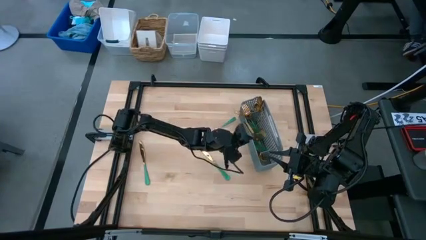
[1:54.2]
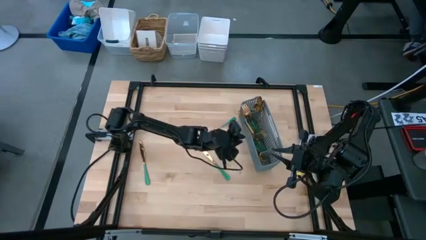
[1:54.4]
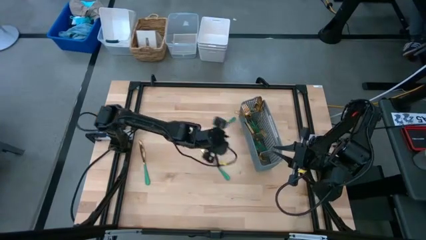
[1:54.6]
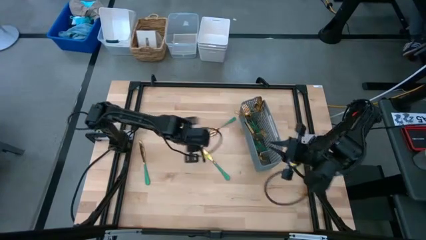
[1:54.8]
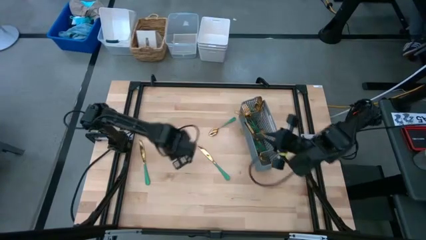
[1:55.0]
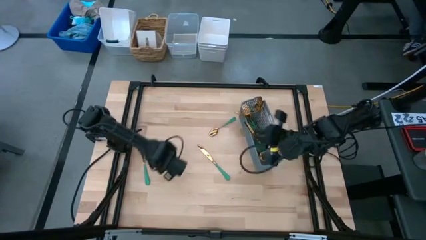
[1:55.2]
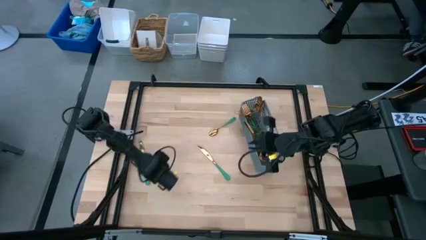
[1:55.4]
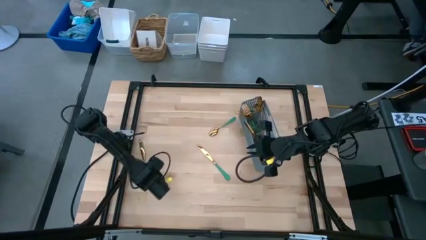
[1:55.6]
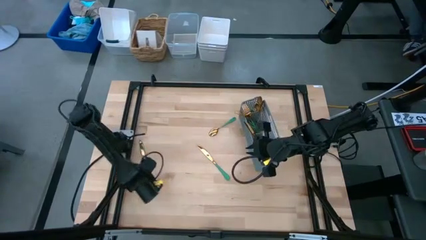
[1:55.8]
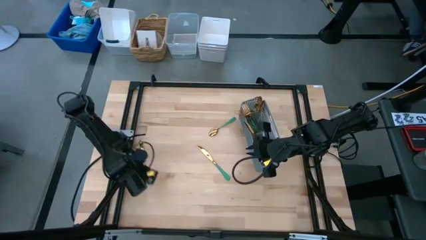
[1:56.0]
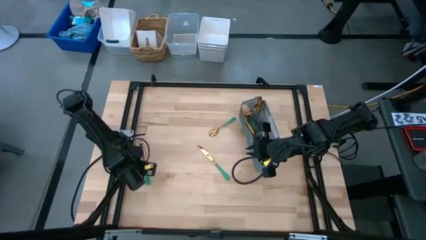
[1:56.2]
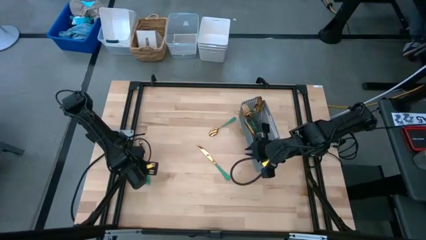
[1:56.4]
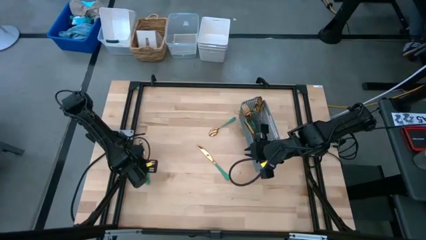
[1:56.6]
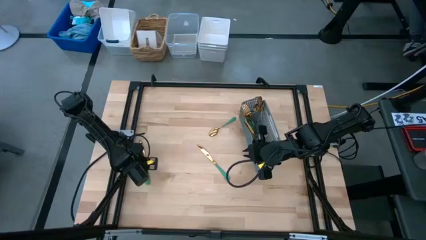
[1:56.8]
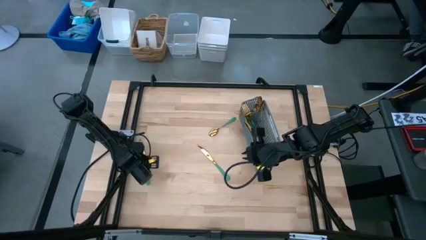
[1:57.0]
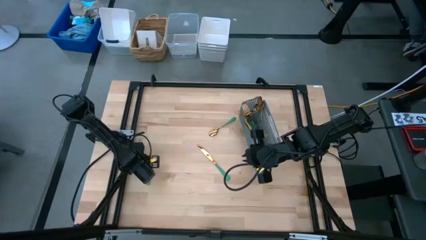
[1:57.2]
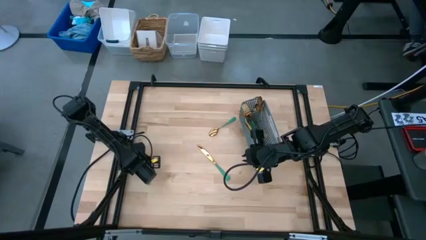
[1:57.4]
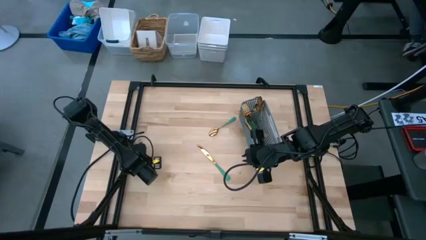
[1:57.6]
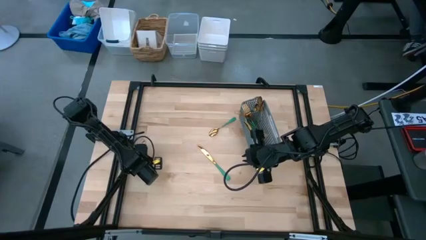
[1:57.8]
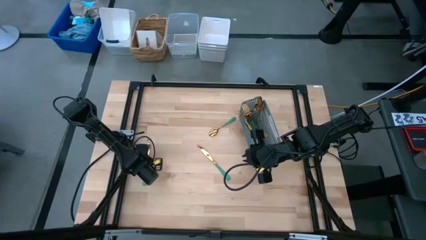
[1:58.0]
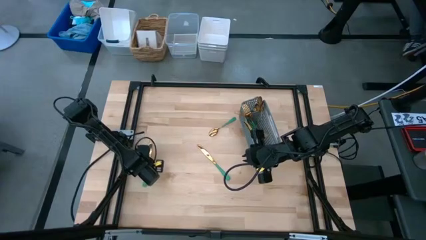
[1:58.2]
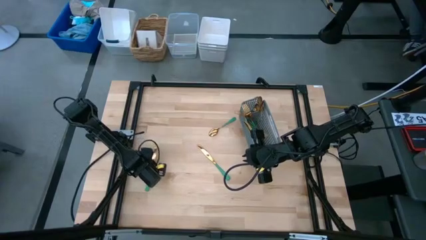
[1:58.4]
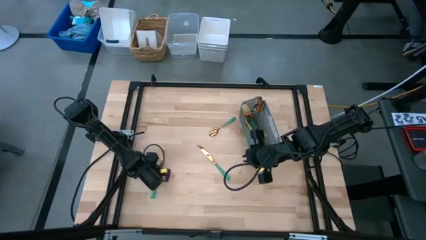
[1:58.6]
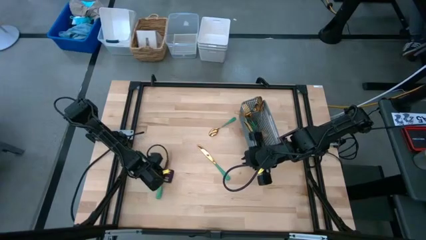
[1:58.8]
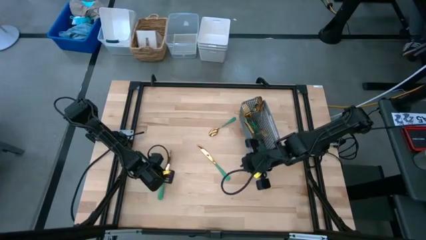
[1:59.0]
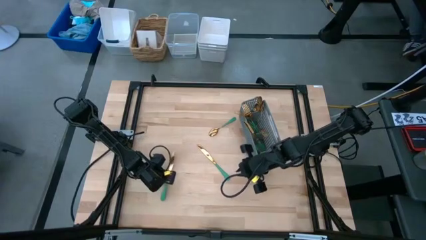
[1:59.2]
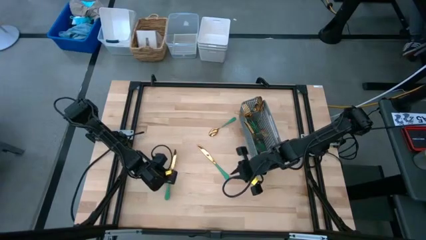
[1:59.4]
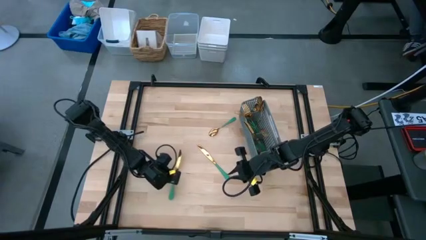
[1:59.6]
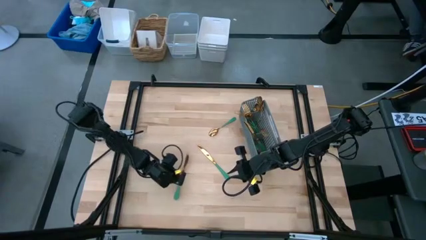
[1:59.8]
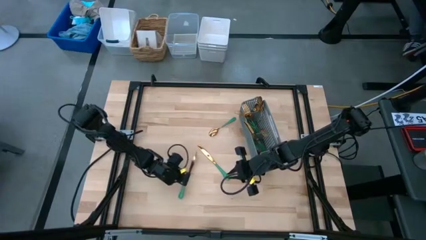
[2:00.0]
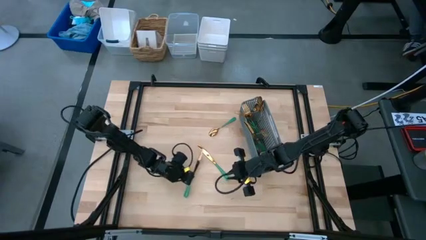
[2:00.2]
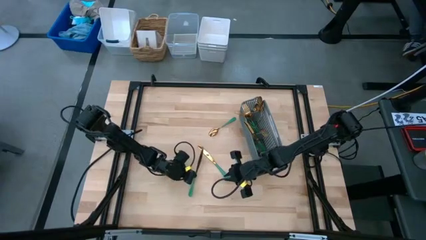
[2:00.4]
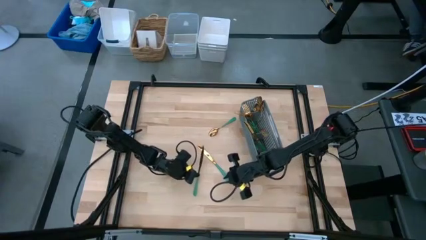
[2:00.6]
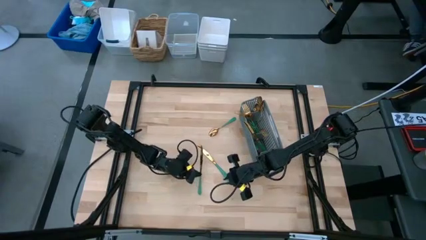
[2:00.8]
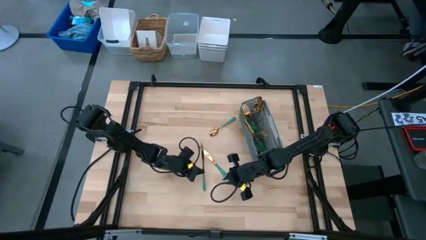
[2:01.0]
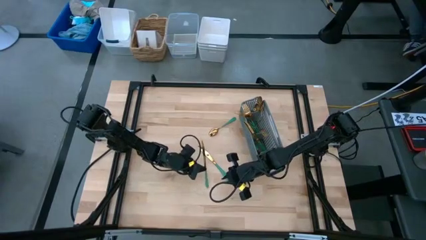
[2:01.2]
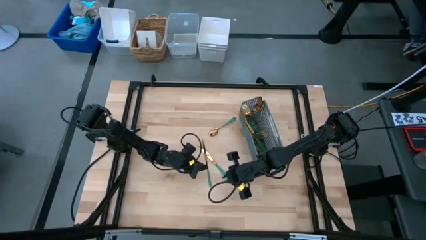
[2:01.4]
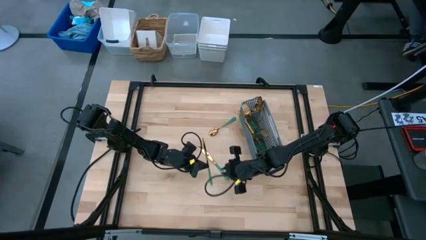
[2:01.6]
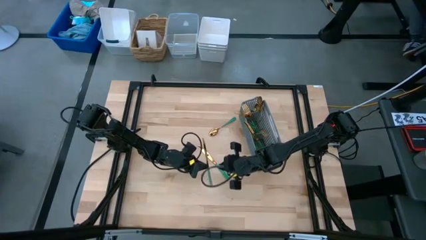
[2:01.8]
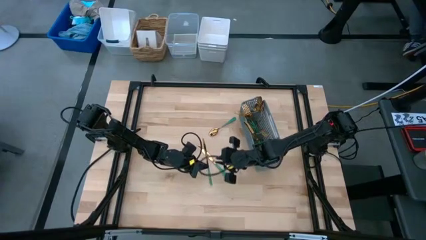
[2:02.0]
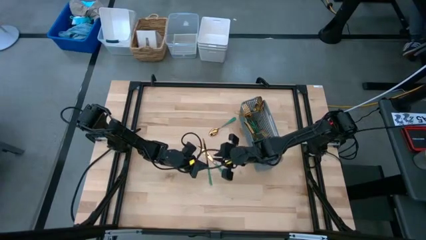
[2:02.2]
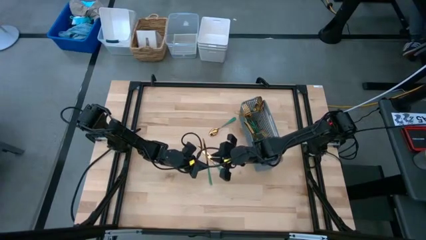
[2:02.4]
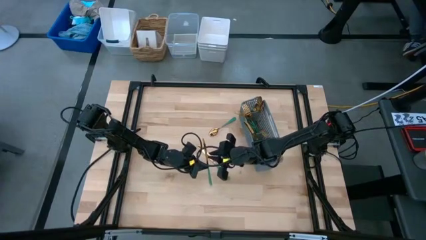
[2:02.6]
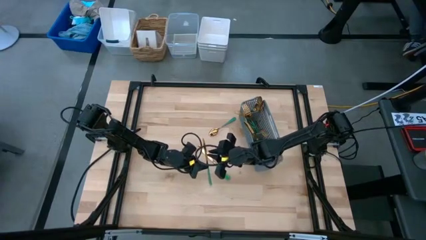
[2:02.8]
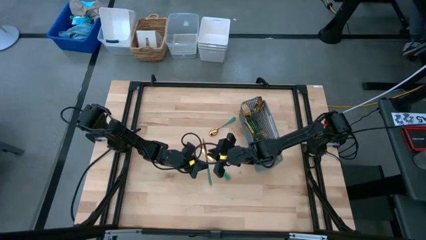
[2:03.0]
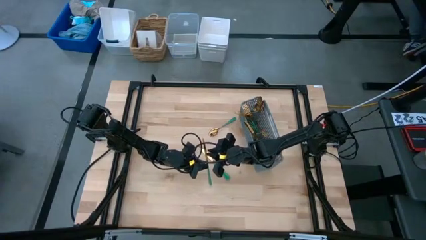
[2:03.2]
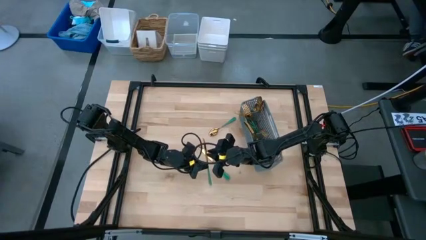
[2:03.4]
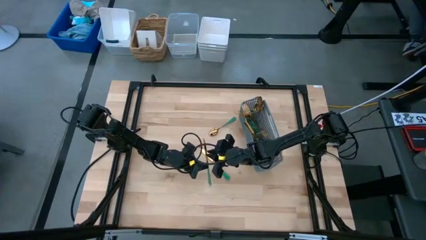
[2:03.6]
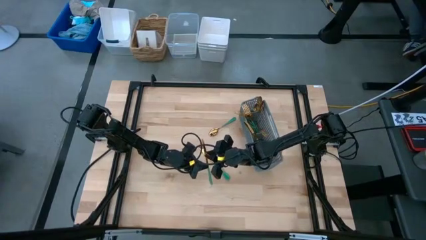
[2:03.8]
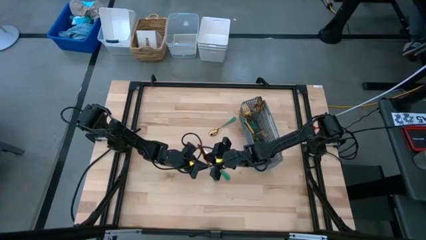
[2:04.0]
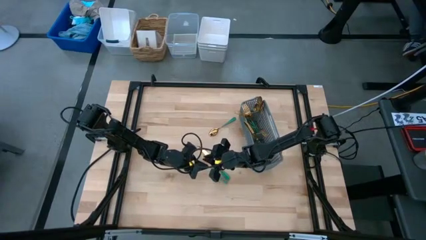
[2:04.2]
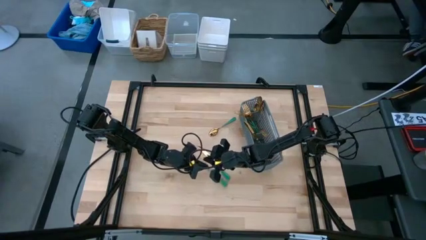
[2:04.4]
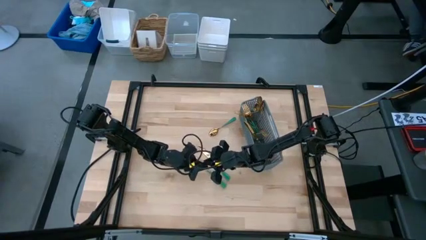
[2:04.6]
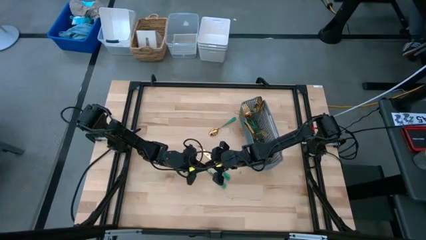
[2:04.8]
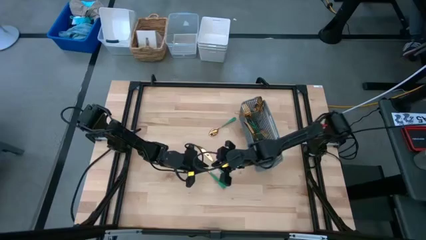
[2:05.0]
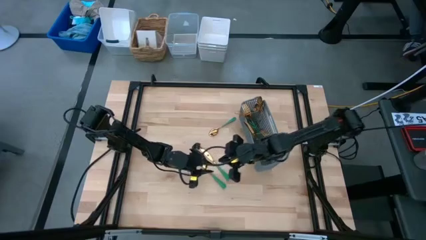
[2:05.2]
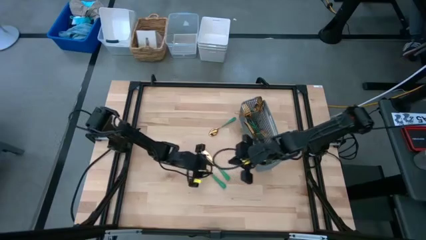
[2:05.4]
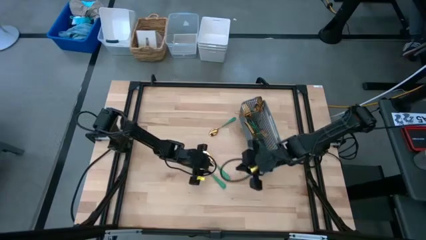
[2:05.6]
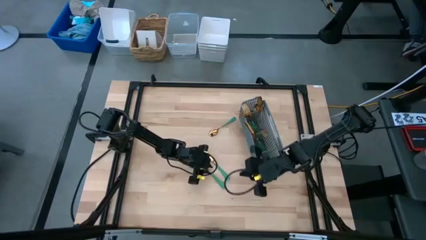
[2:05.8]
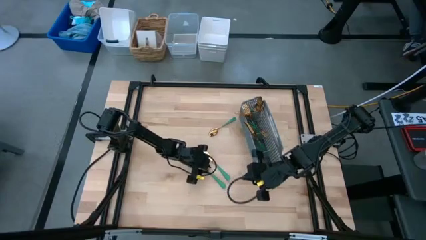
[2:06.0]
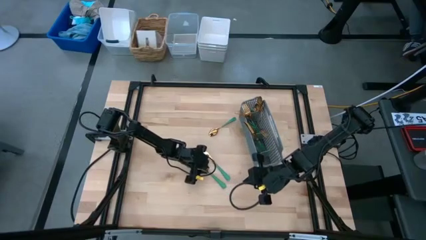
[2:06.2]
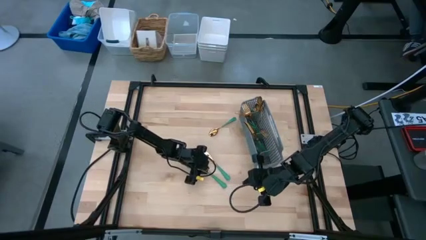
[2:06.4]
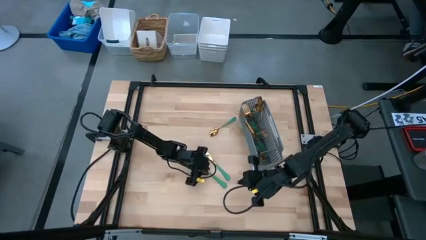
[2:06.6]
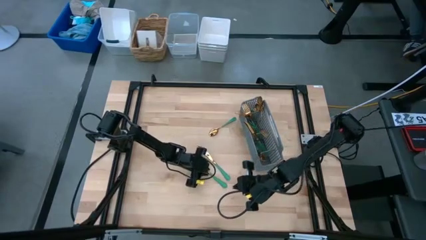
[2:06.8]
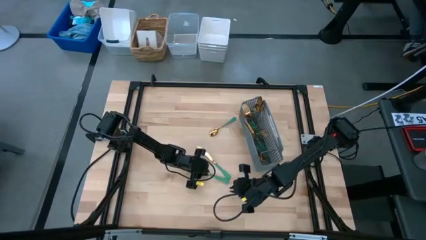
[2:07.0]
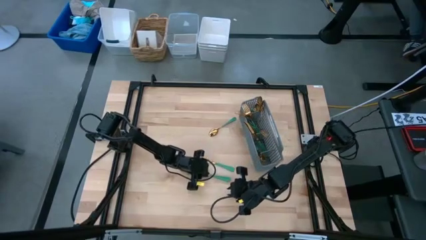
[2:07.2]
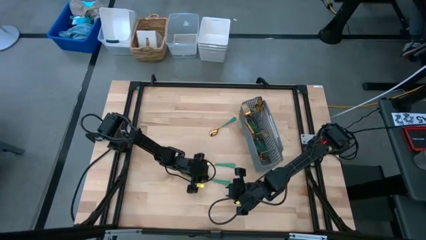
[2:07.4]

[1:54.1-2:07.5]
Task: Sort silverware
Put the bottom left knife into the bottom section of the basket

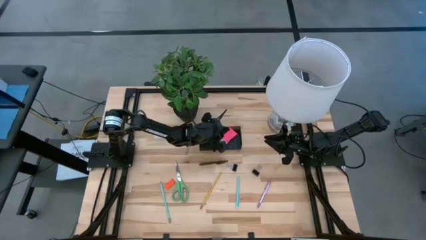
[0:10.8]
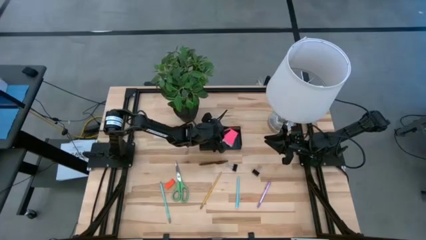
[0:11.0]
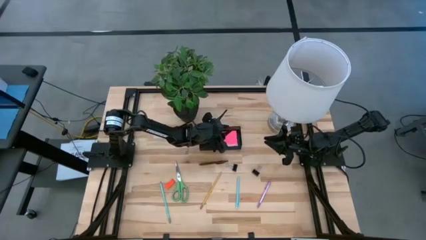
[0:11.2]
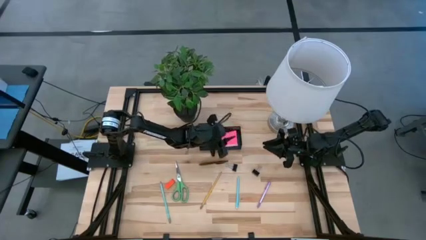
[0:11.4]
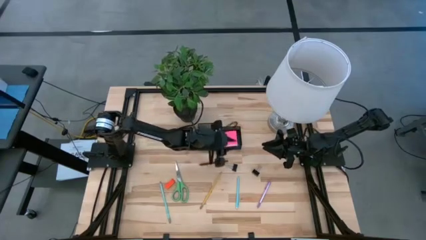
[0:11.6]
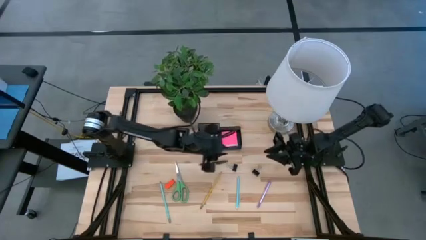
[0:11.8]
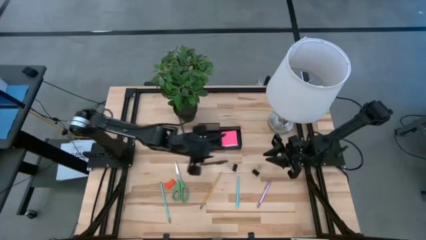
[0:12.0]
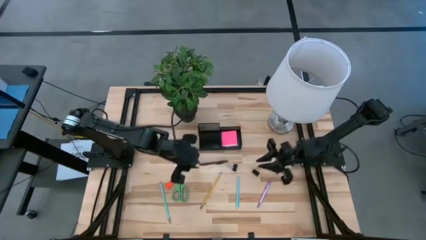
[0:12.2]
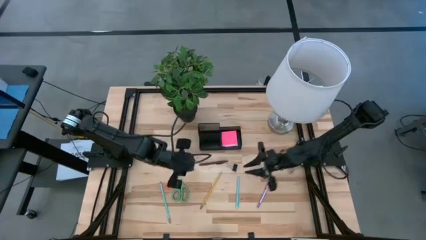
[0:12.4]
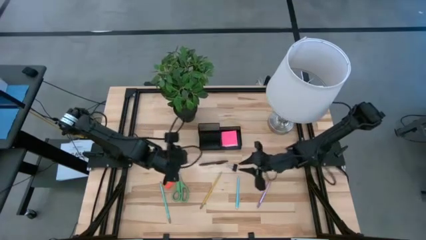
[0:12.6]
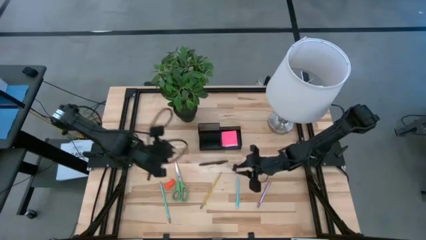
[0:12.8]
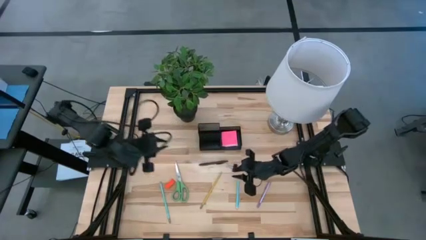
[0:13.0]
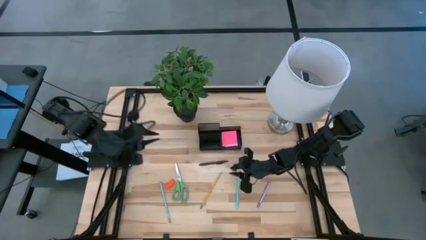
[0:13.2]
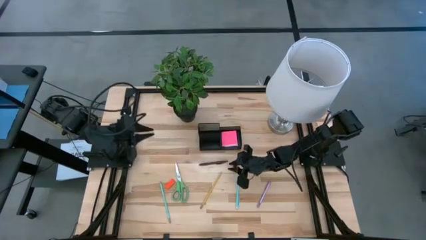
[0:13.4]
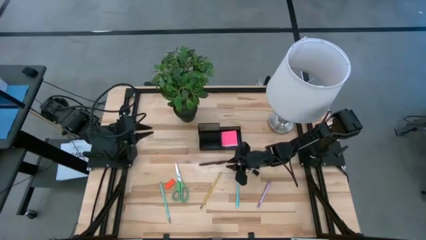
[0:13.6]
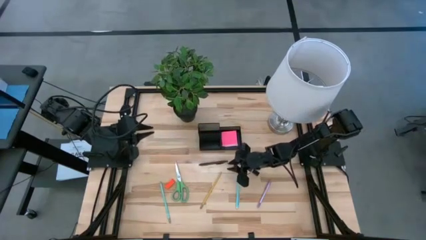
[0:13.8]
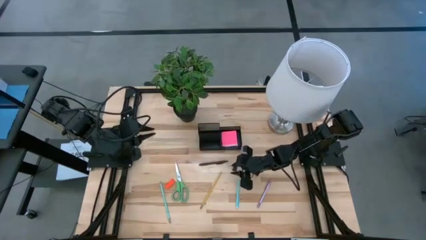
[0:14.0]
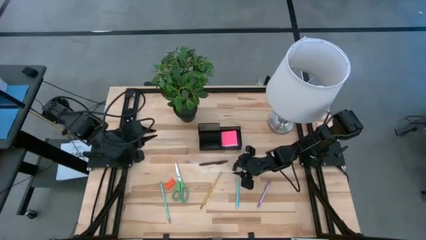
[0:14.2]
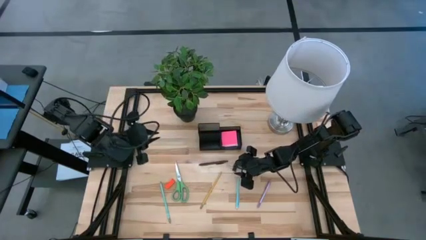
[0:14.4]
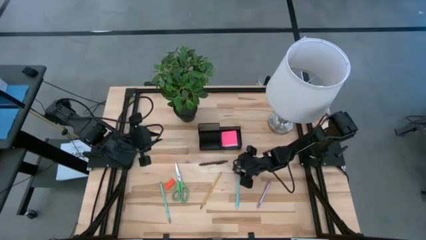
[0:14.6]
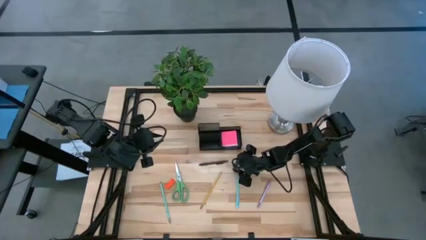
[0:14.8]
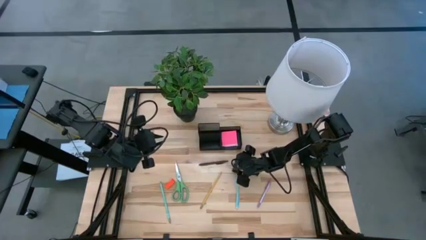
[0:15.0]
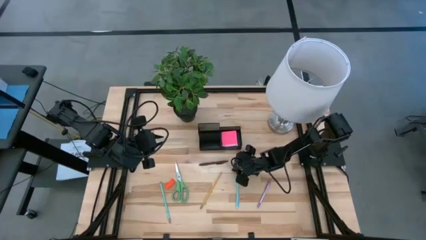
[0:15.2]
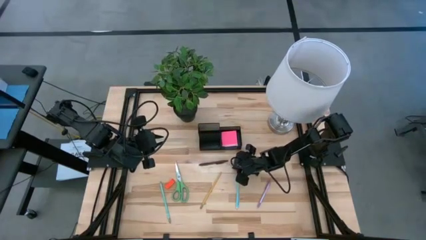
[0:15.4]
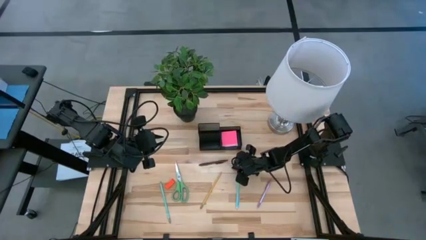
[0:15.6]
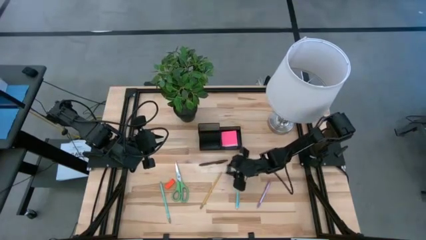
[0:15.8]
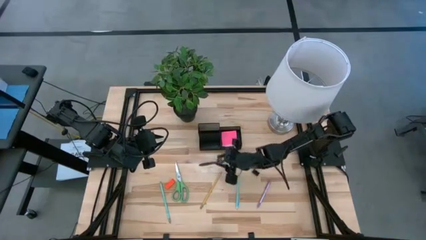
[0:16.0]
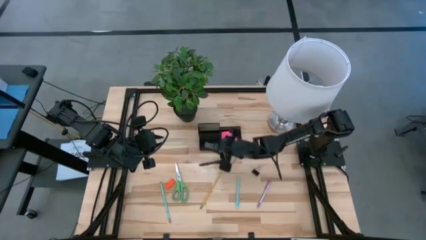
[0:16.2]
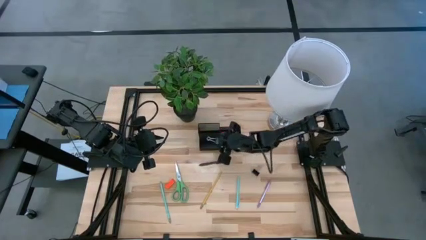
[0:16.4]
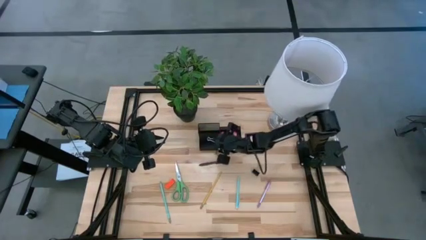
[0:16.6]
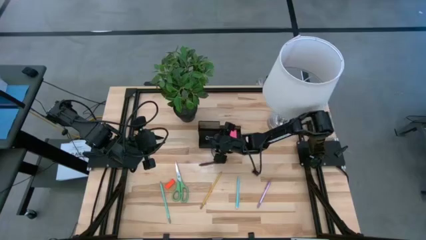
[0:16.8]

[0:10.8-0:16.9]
Task: Pick and place office supplies into organizer
Put the left black binder clip into the black desk organizer
